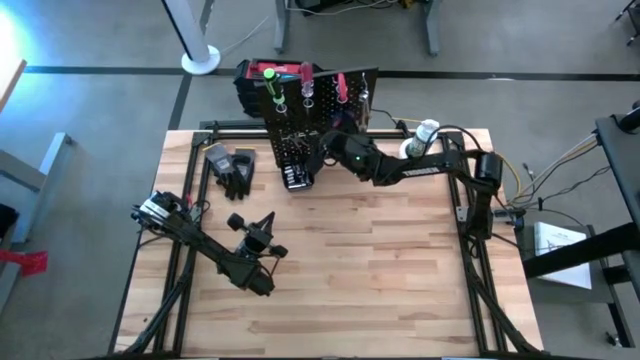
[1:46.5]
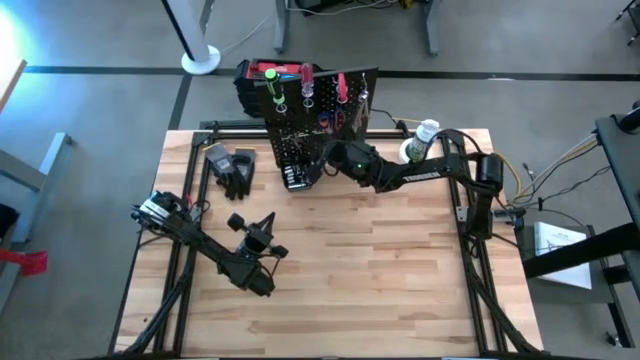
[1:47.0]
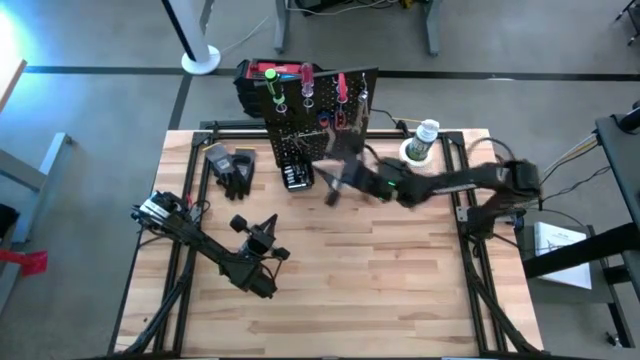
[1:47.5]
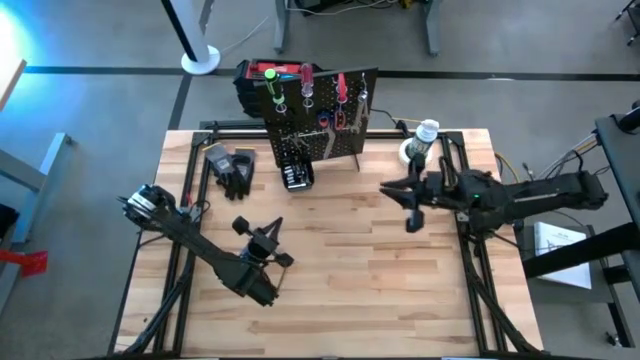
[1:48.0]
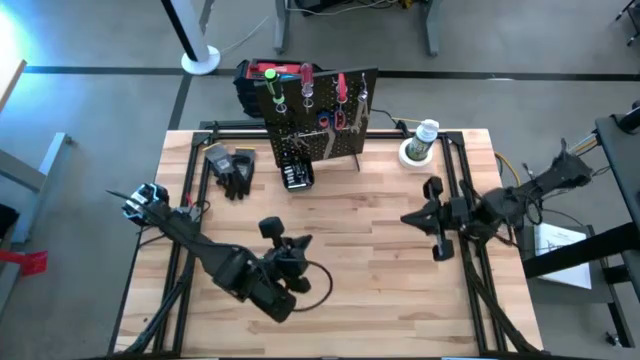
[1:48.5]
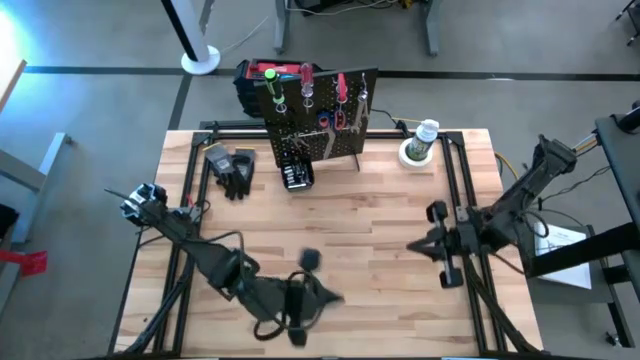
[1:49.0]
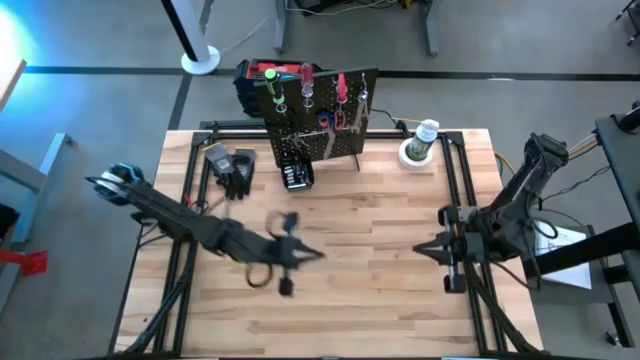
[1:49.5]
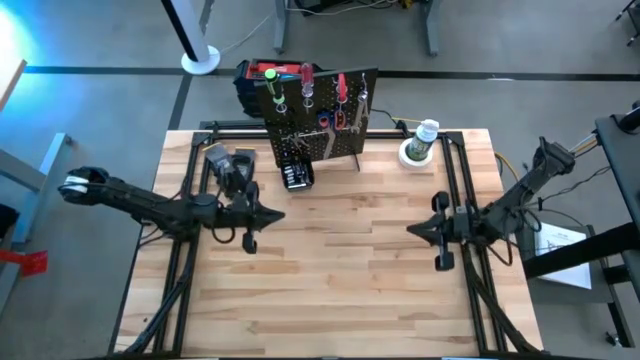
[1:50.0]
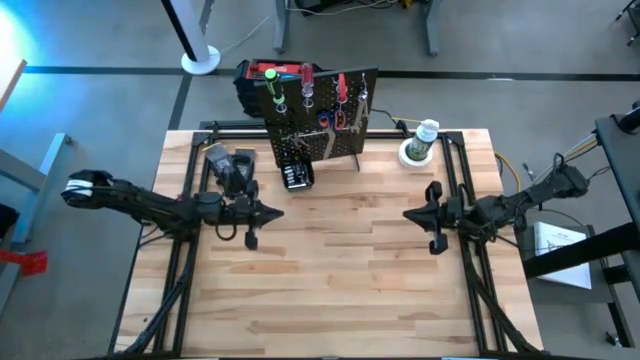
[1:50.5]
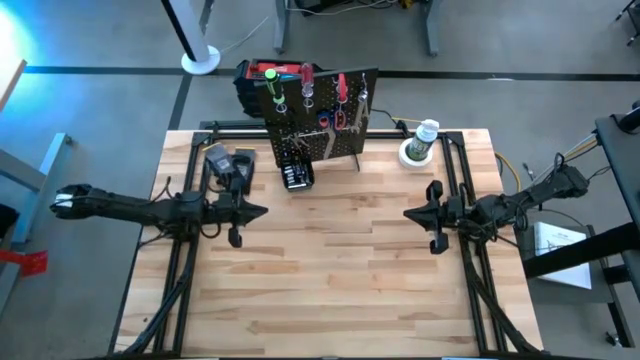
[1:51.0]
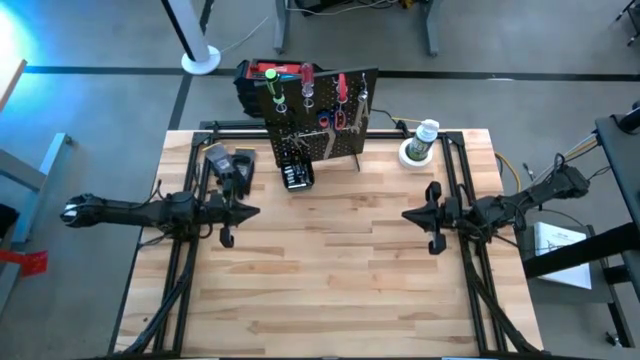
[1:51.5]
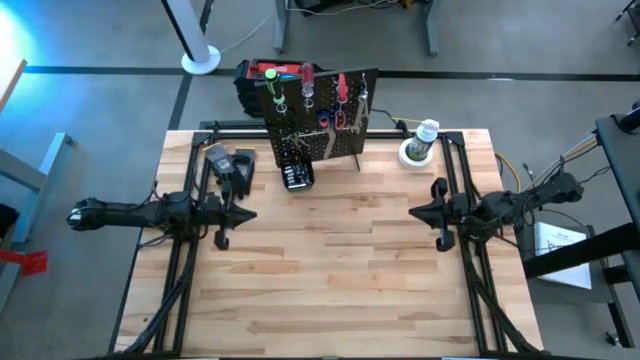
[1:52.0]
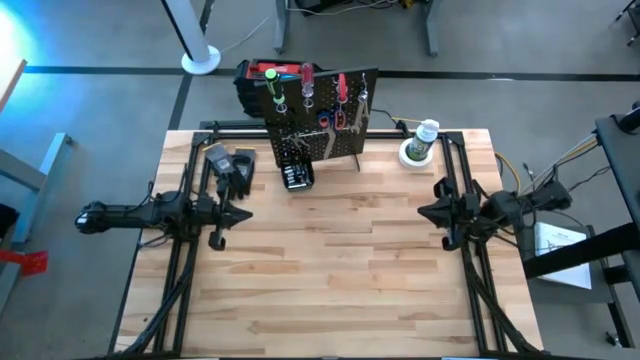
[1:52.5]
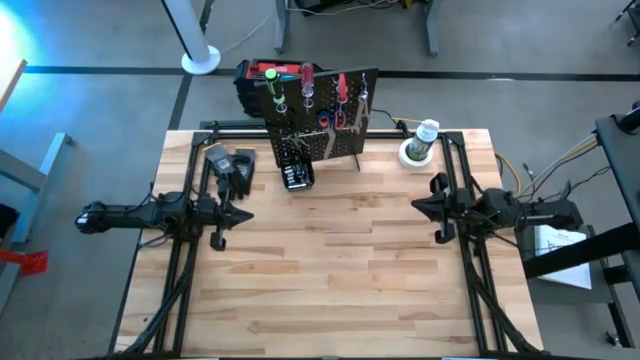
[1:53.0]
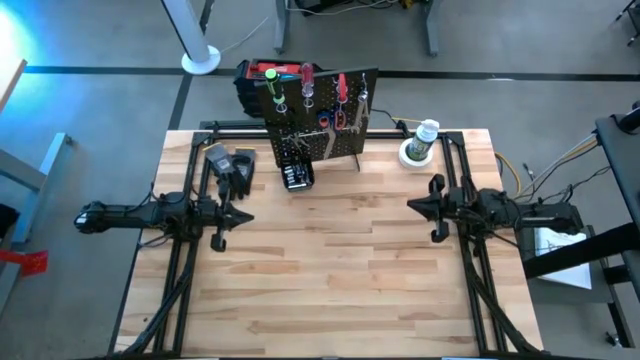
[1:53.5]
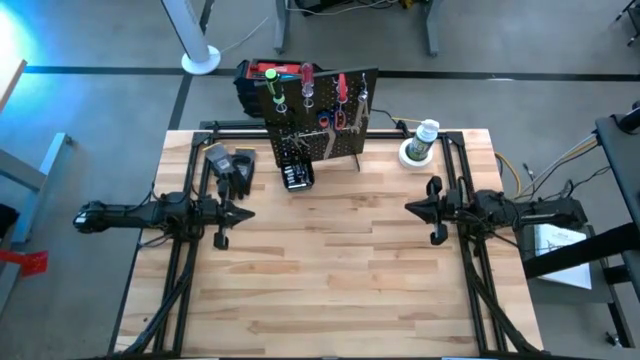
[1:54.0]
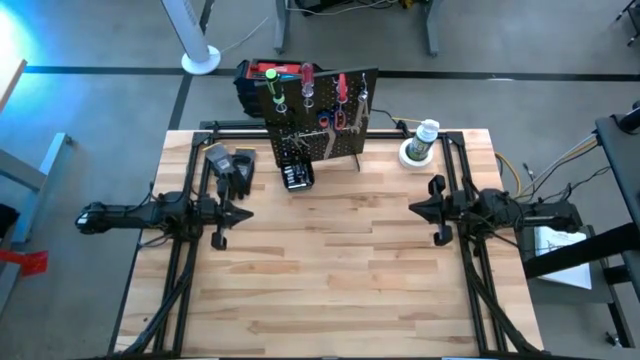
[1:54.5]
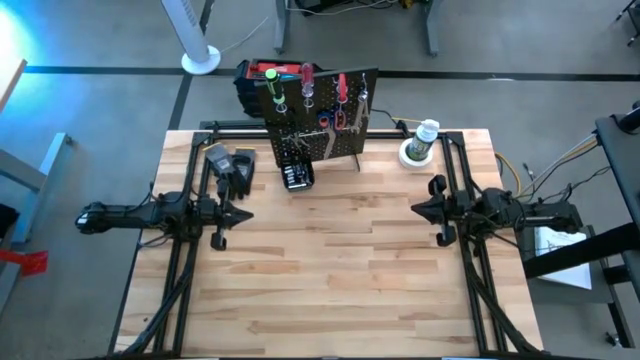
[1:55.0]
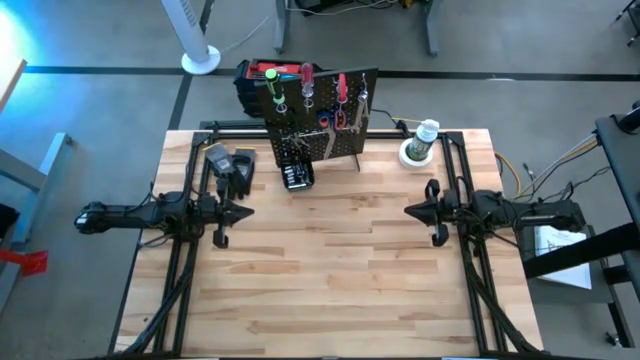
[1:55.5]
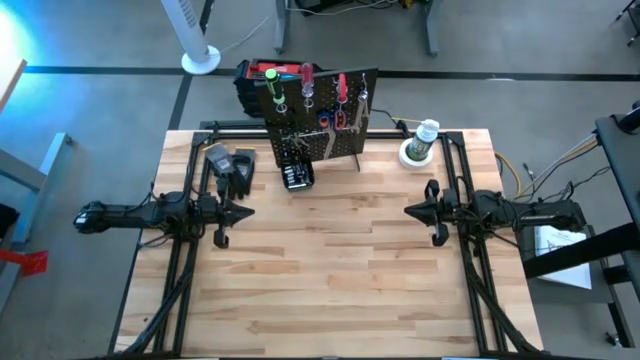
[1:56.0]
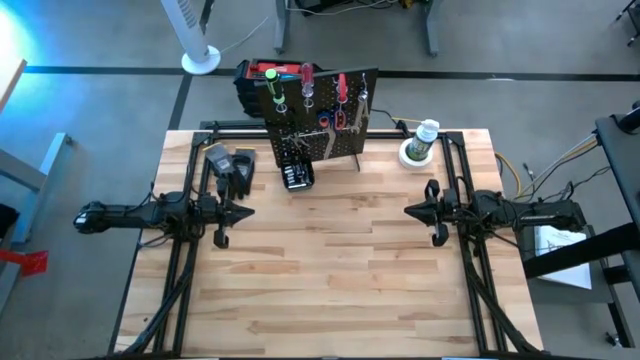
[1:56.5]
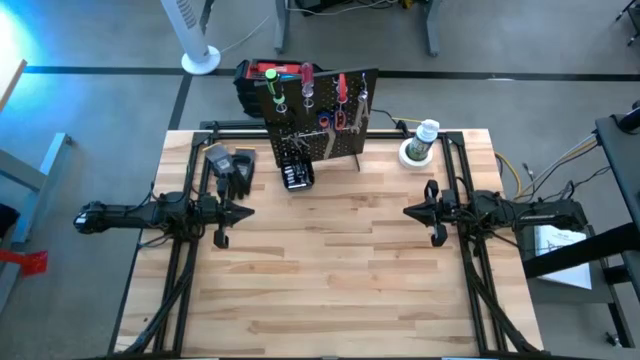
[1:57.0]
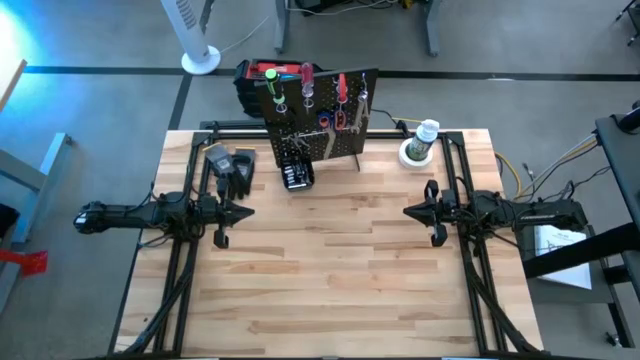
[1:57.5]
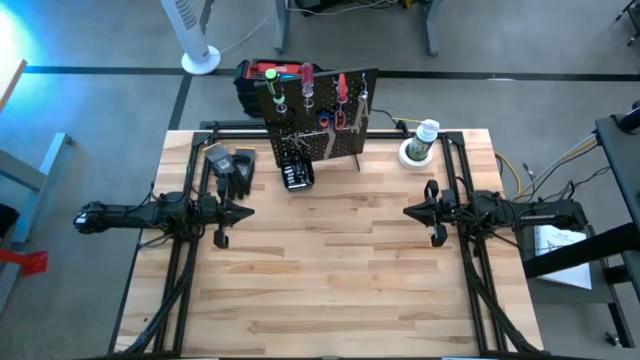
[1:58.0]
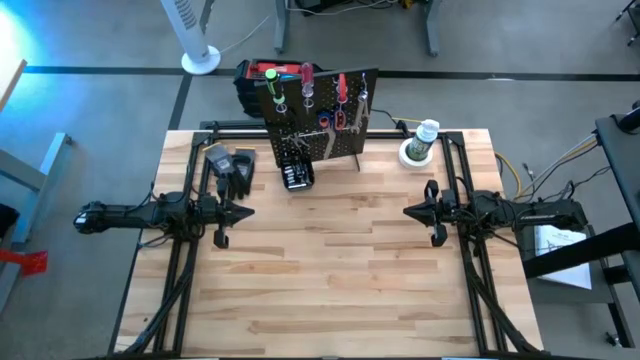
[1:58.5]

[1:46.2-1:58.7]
Task: Hang tools onto peg board
Return to Home Position

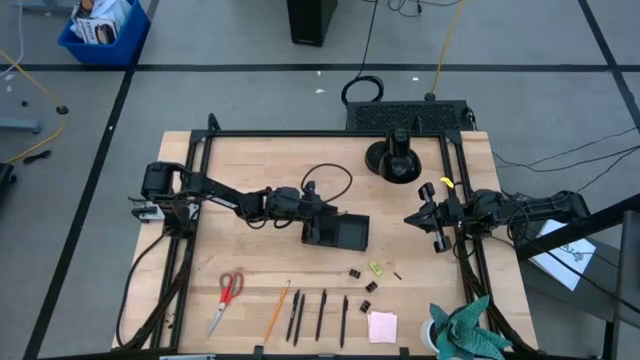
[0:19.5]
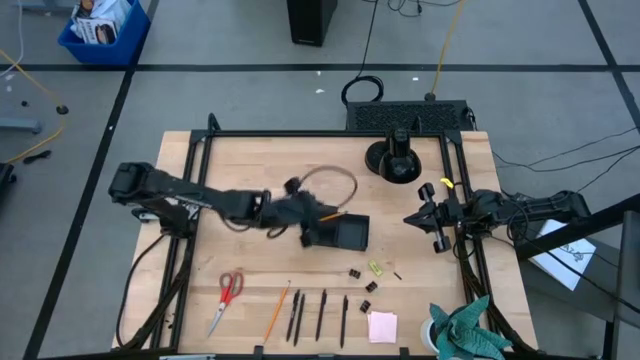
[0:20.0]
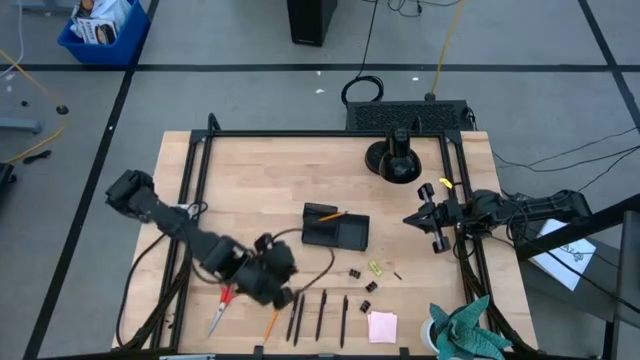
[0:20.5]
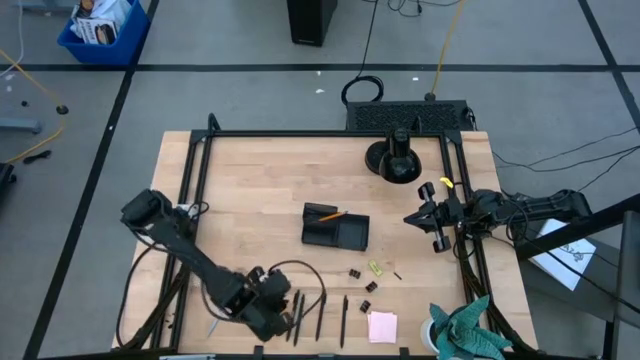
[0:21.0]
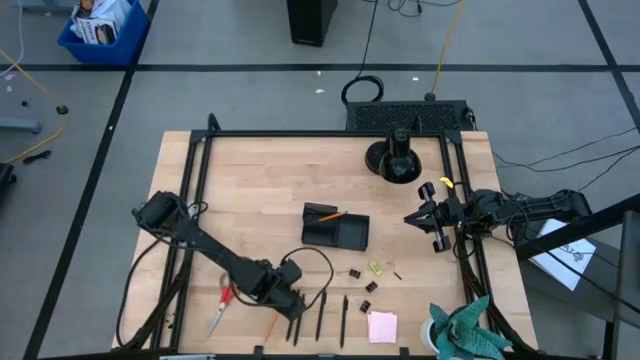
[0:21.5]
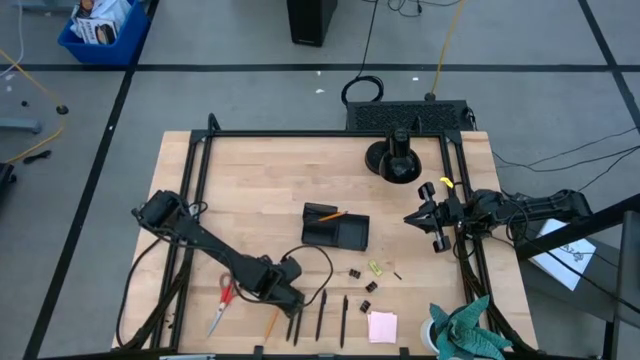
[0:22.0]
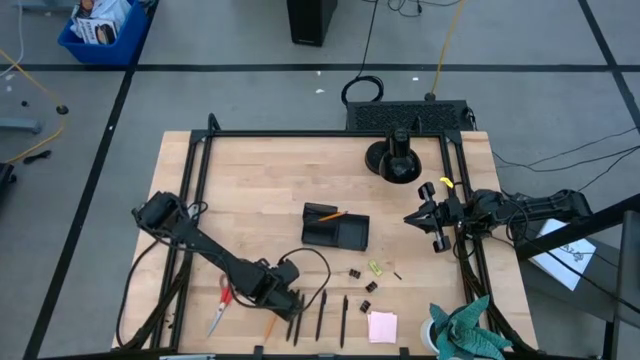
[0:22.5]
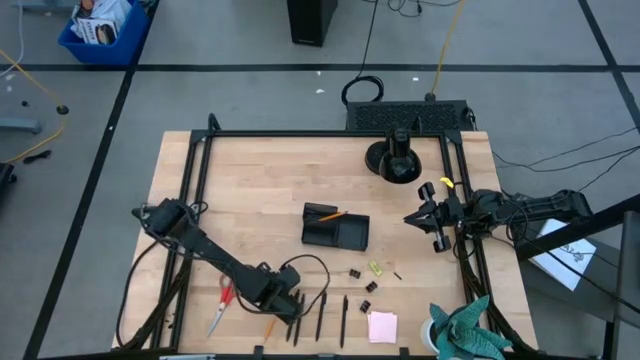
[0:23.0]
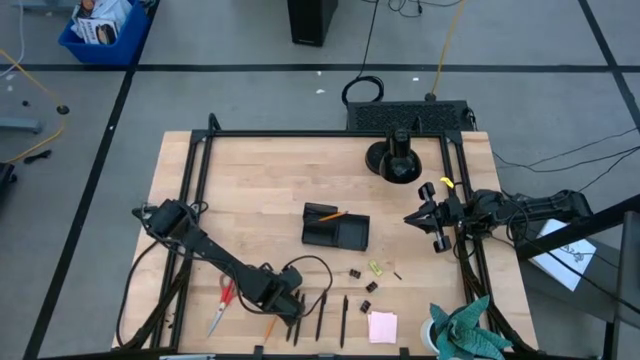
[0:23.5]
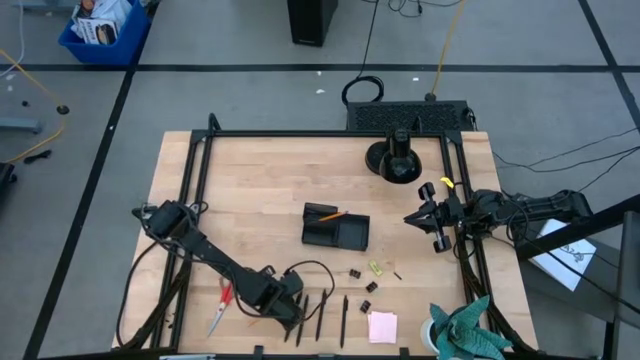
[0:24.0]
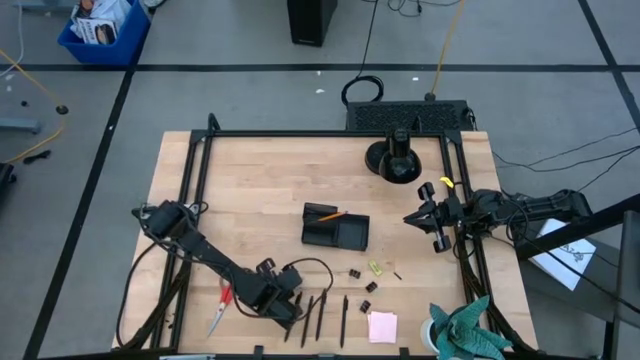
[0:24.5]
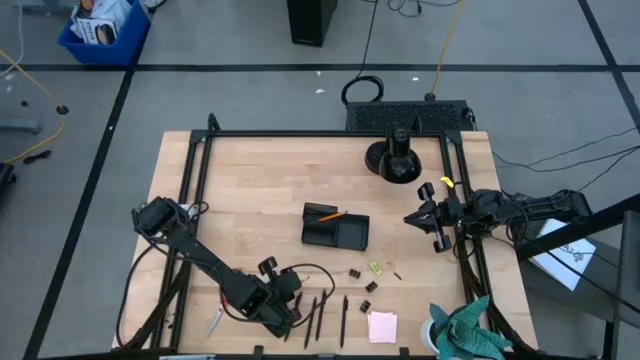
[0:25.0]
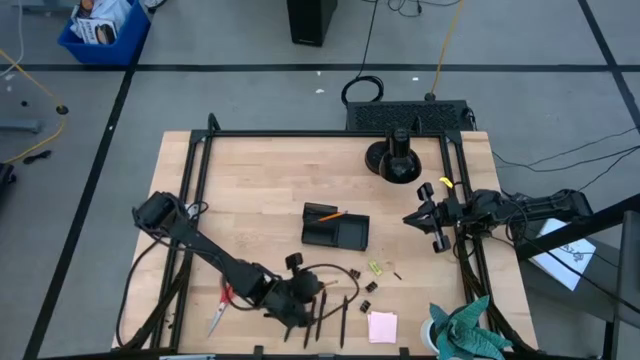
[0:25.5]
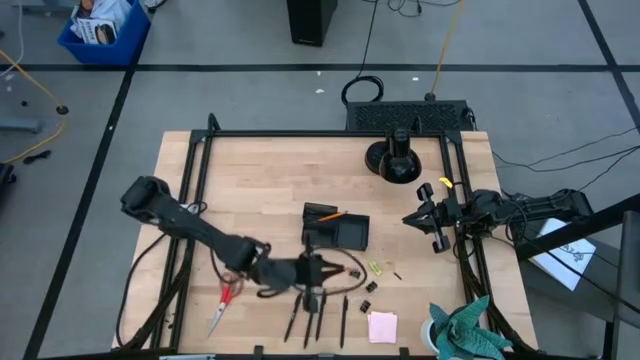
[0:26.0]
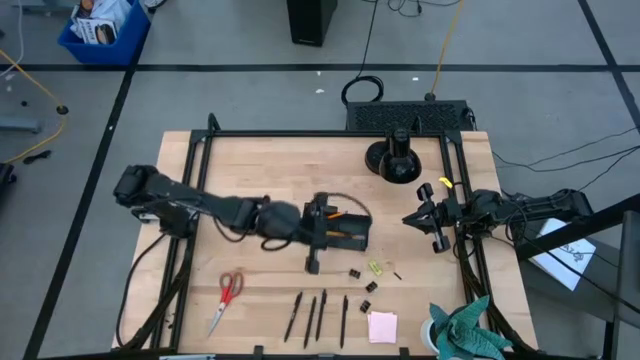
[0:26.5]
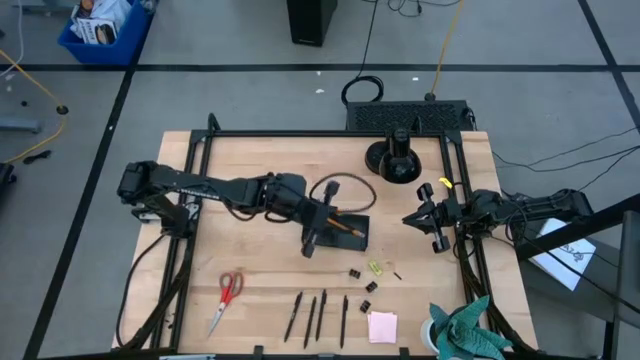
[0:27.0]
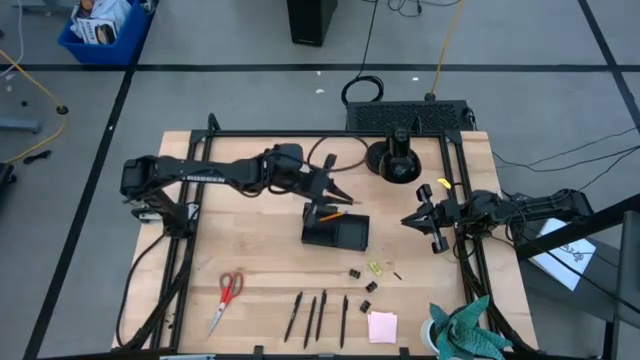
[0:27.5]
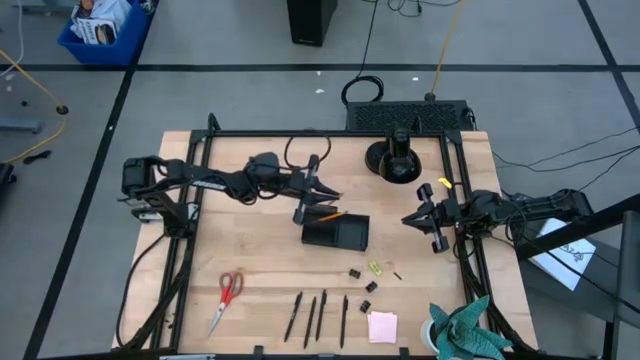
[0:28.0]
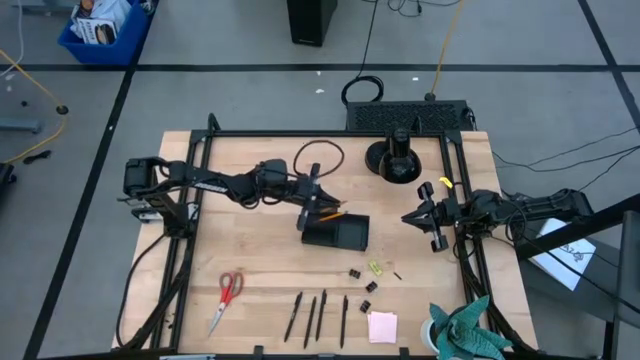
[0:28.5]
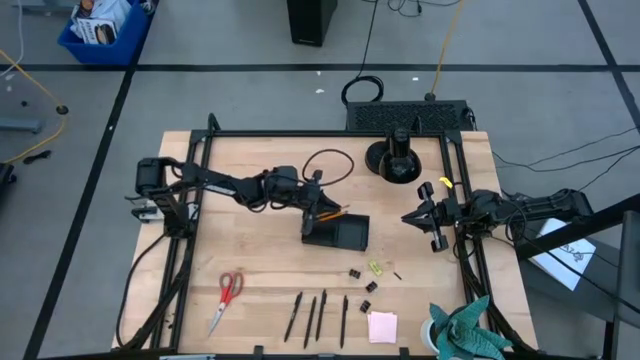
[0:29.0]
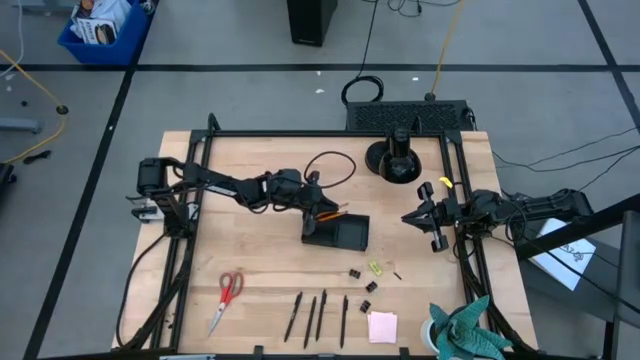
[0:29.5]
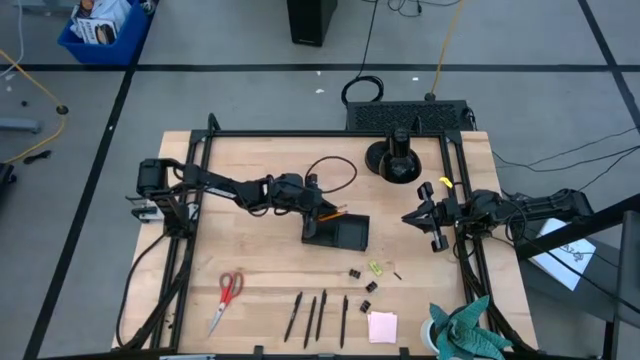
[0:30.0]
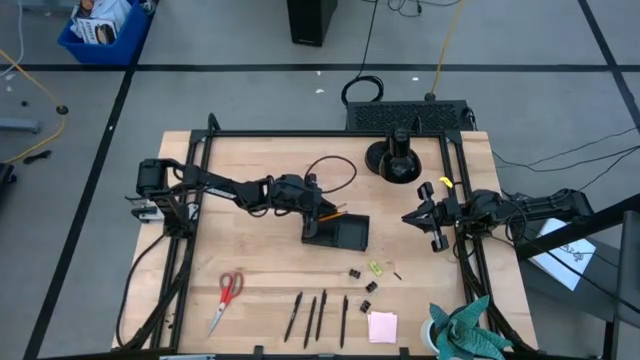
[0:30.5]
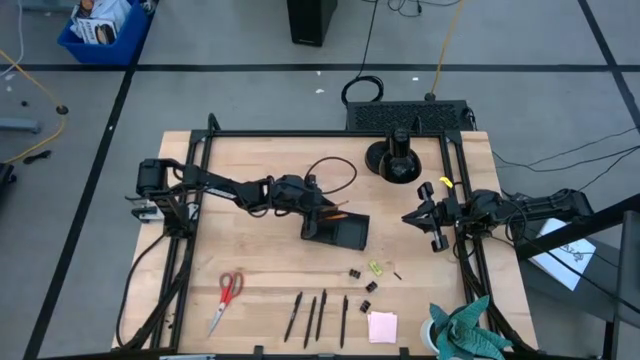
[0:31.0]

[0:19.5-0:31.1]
Task: Pick and place office supplies into organizer
Put the yellow pencil into the black desk organizer
